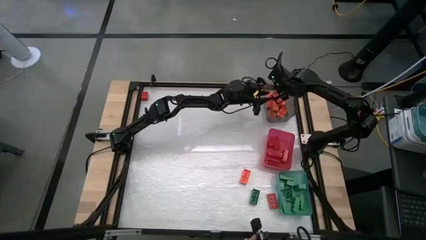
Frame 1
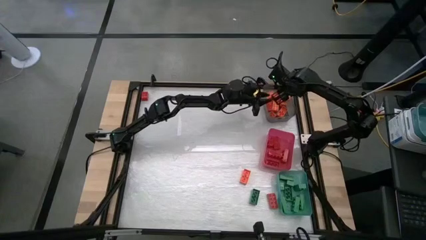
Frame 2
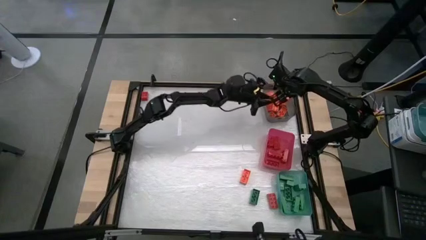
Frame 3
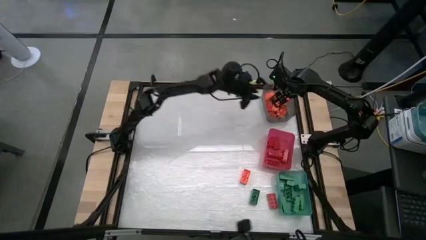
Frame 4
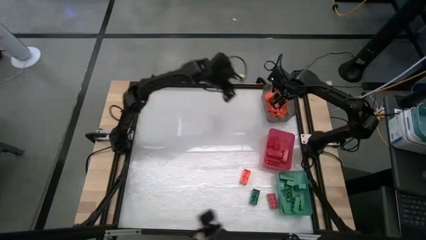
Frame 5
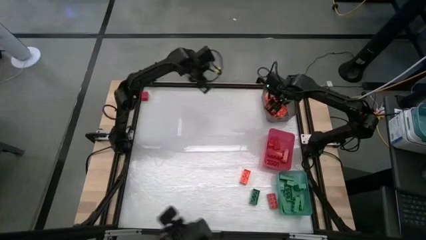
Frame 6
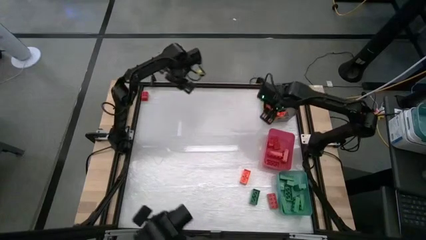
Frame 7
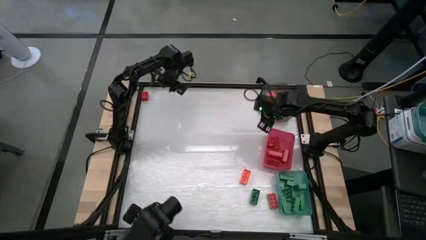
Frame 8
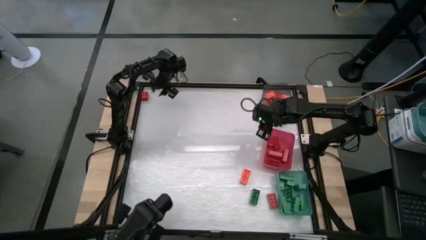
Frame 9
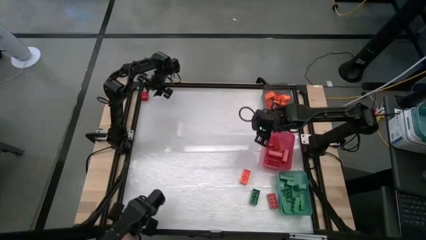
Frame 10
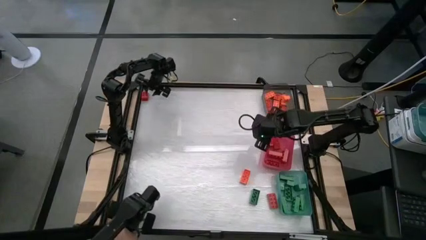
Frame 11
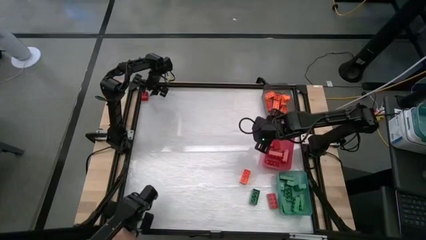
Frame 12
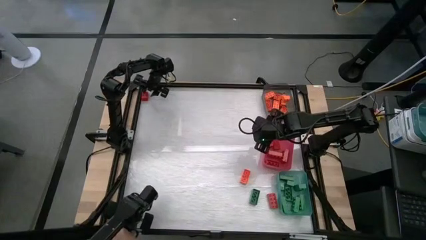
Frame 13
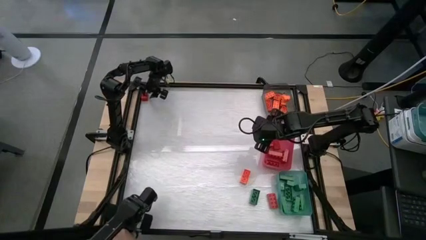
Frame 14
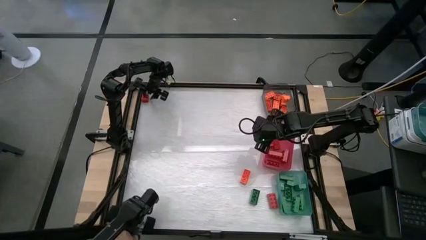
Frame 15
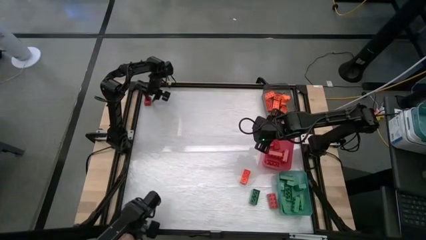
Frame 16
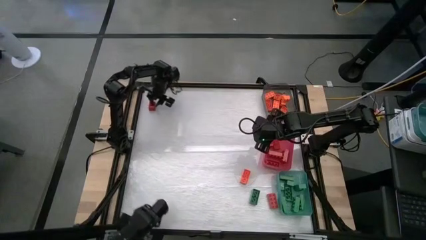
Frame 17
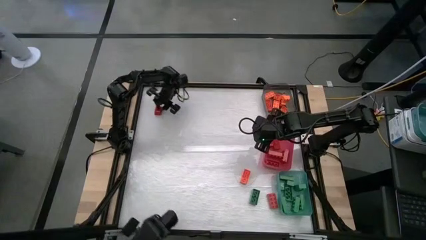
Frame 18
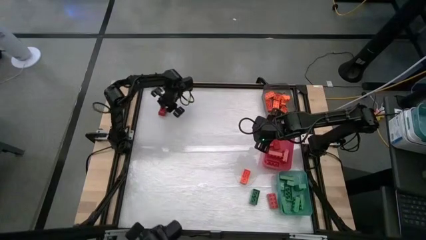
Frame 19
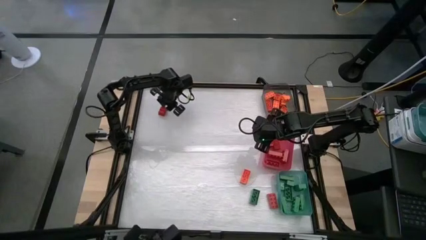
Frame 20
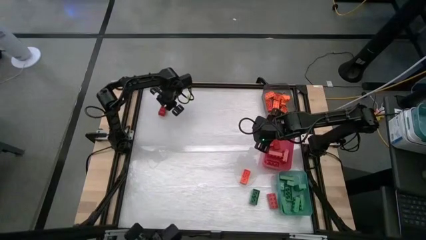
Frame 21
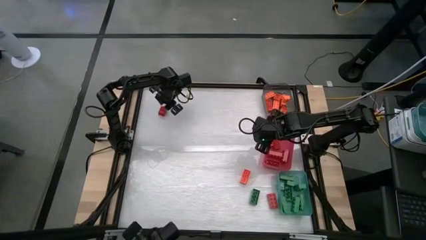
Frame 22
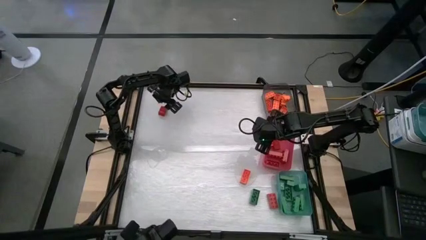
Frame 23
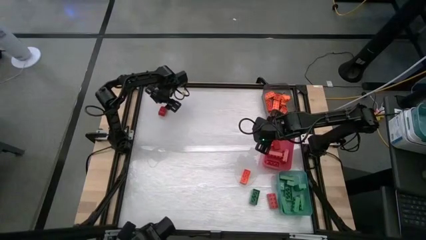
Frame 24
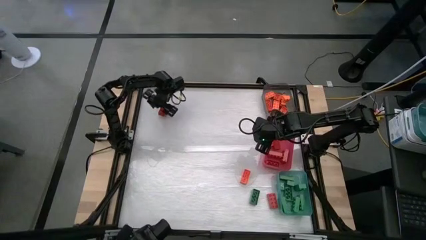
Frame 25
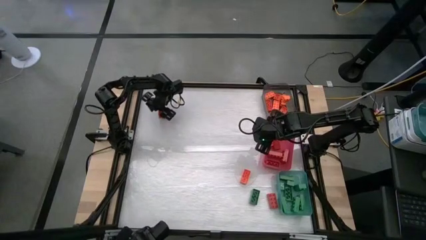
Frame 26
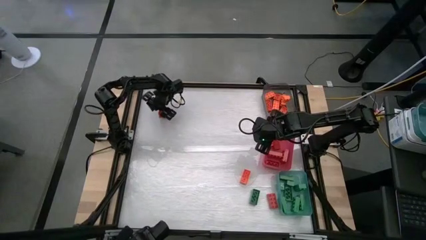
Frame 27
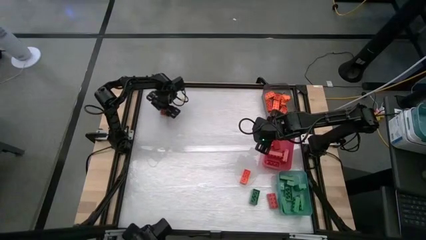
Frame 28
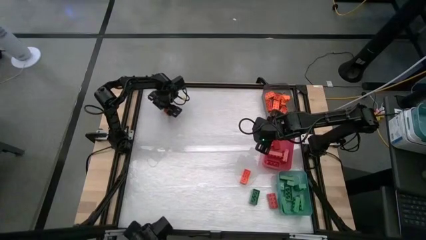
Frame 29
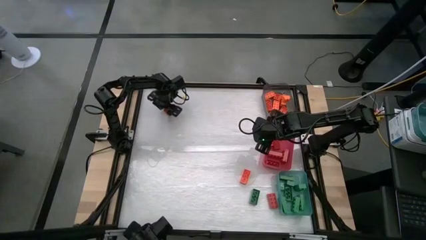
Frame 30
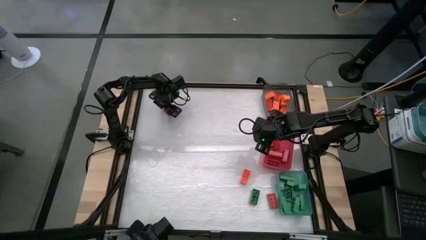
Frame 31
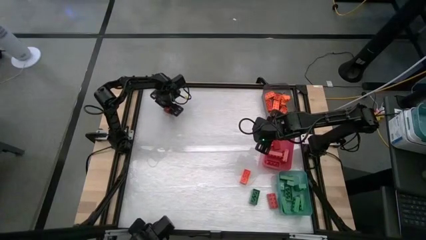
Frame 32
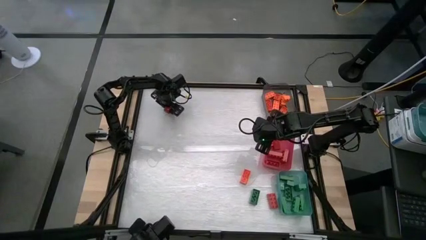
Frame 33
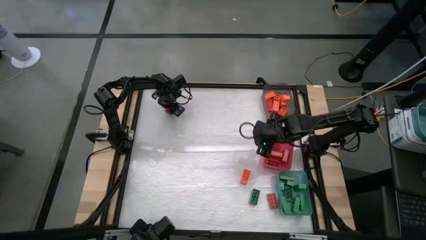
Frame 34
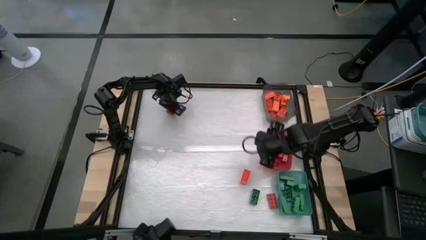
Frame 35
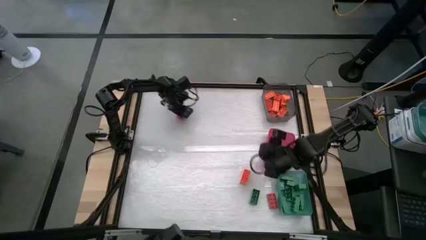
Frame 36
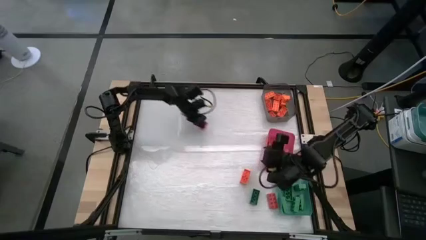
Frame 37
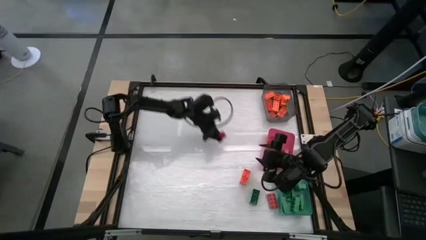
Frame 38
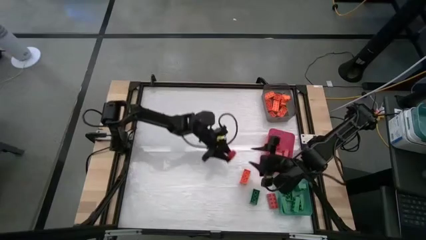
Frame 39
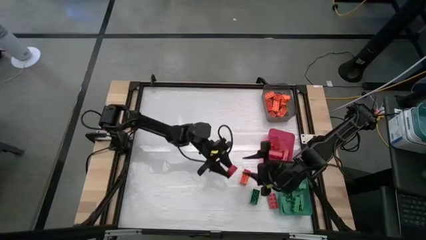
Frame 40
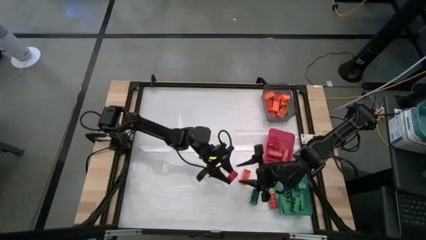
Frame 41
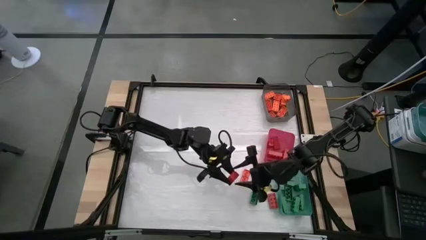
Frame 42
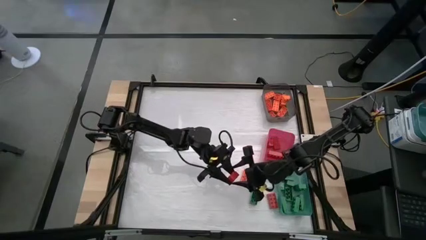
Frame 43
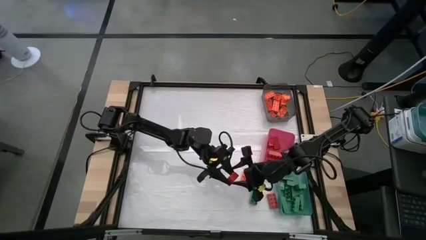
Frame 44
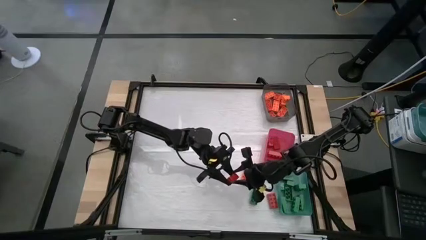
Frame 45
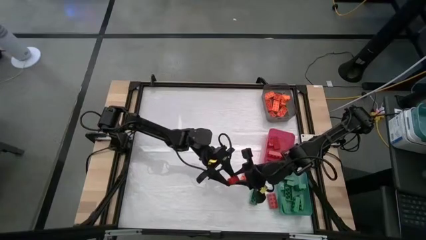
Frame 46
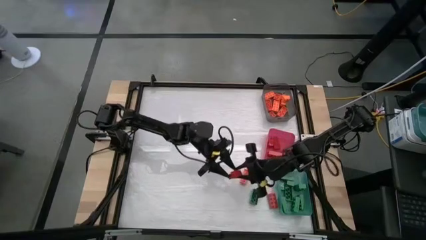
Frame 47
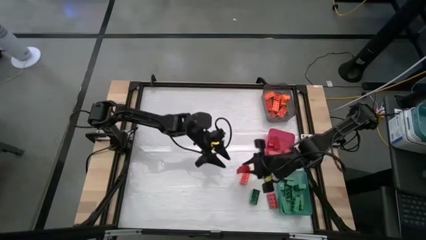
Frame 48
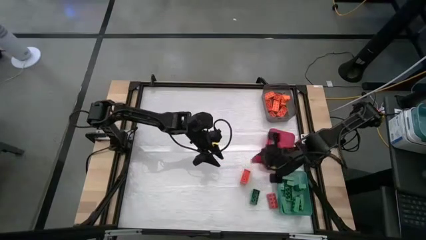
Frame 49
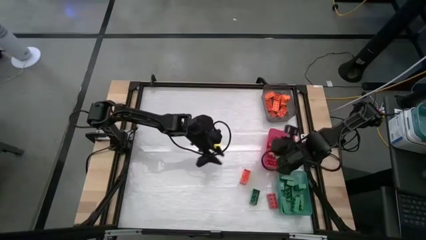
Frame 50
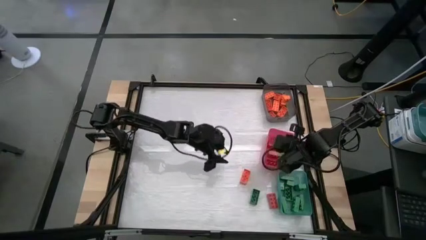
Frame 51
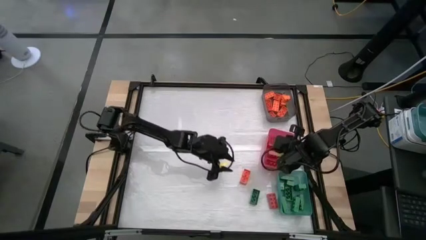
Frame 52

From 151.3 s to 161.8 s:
Task: Sort blocks
Put the red game piece into the red bin

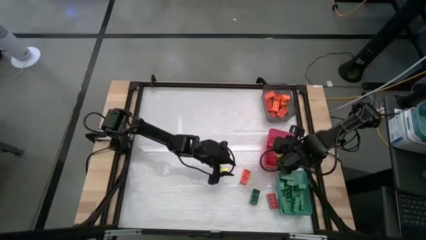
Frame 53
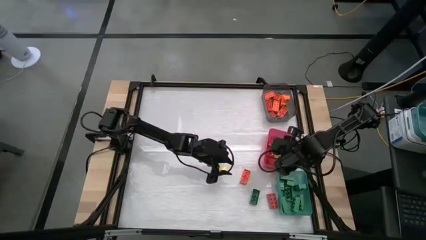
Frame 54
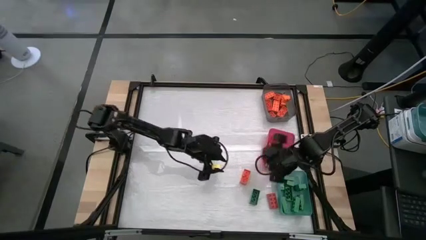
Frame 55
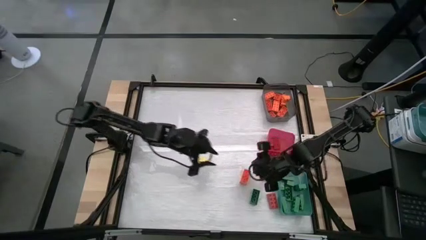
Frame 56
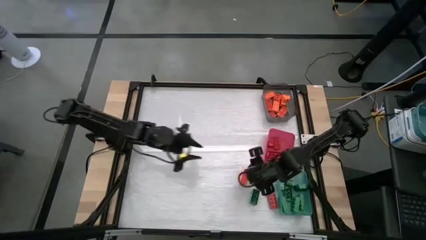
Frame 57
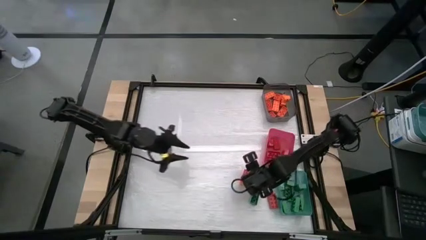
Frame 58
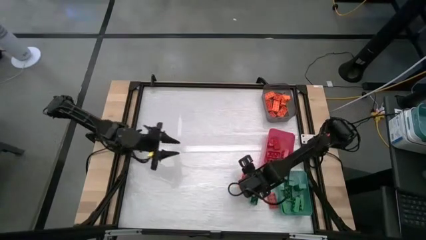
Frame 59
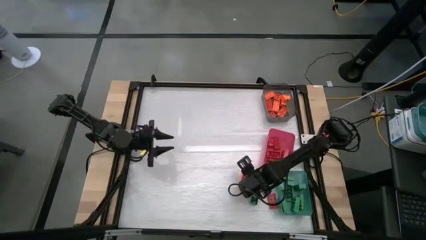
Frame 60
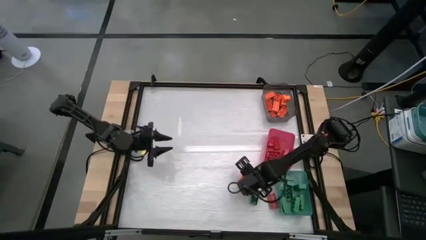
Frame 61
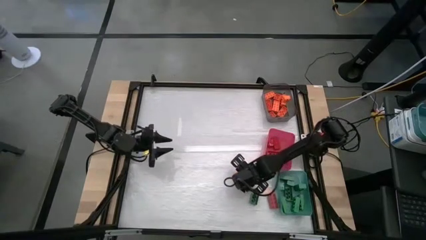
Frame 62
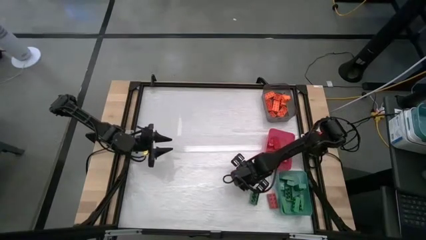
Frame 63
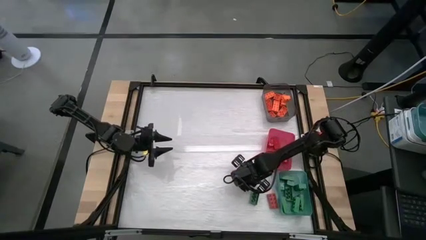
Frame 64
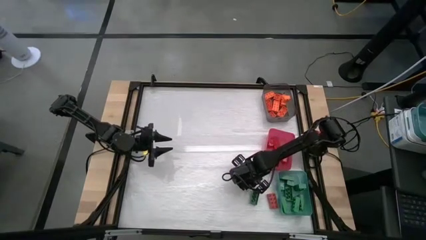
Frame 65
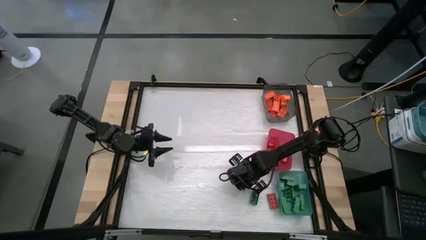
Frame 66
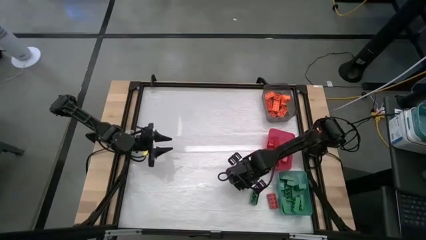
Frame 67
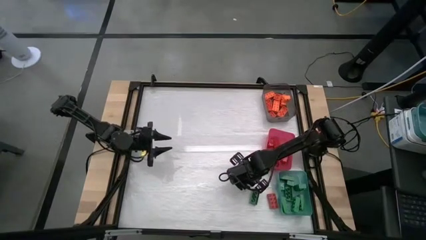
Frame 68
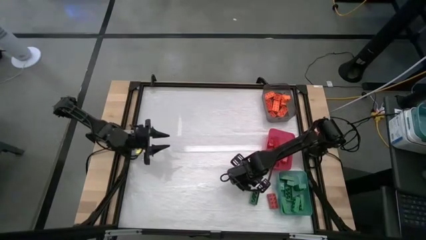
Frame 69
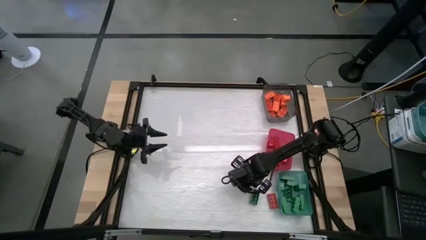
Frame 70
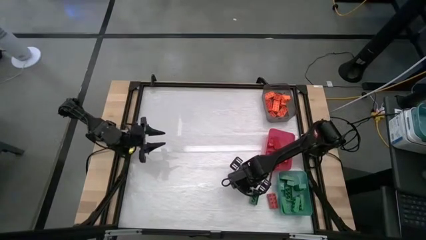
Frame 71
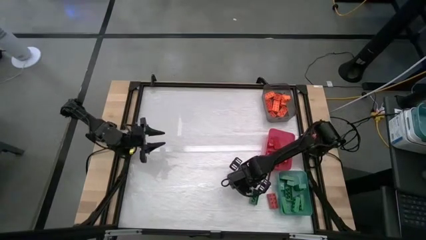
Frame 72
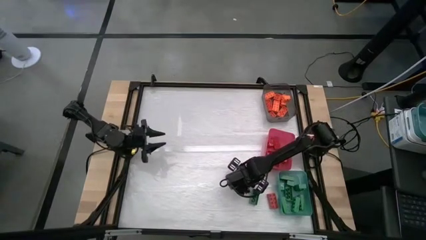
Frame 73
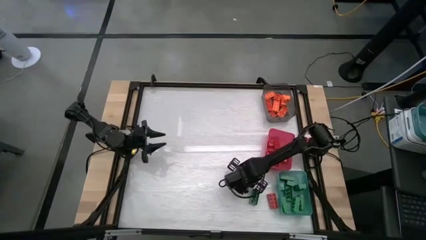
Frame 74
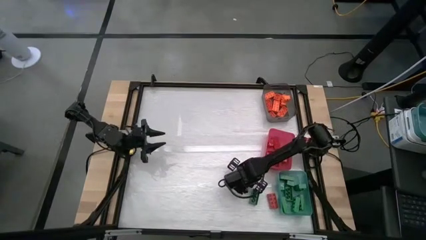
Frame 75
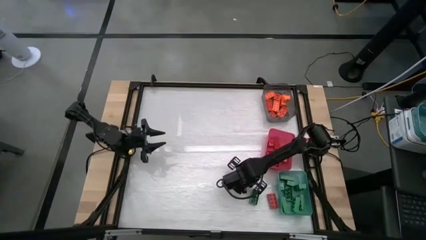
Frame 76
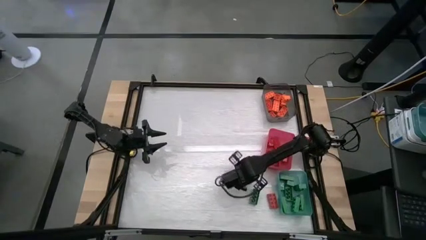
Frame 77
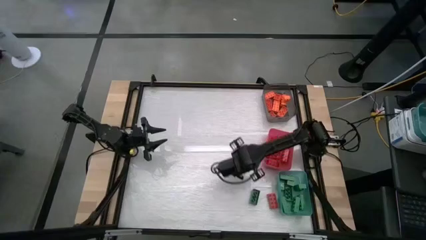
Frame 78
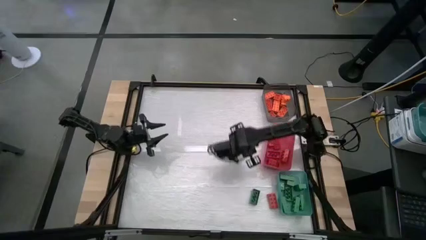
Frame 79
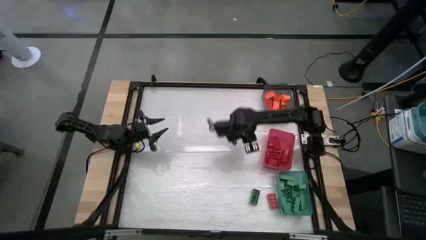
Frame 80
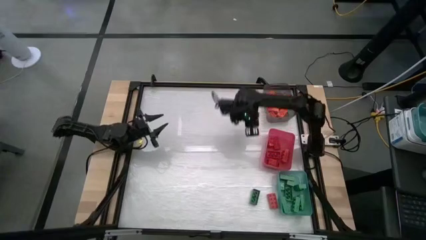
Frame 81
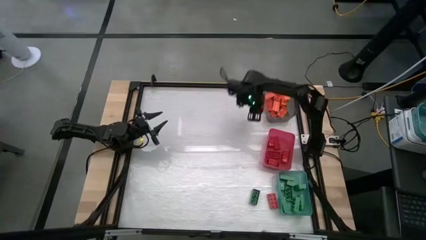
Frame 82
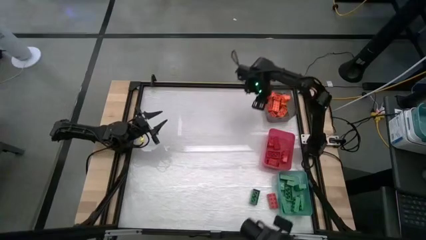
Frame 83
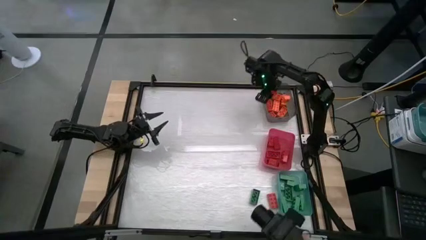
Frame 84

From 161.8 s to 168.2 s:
Put the orange game piece into the black bin

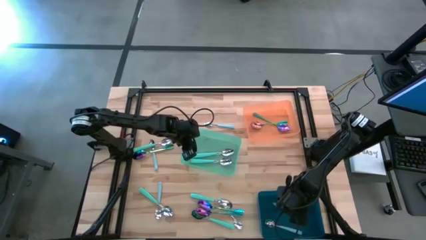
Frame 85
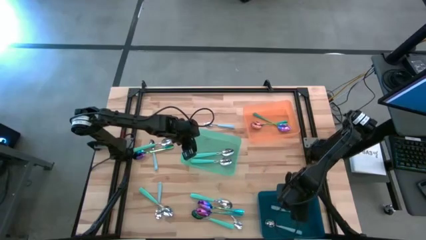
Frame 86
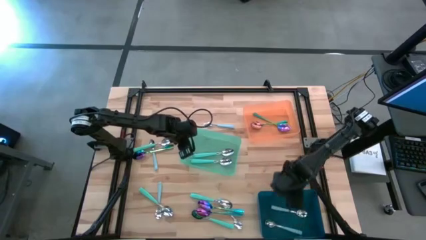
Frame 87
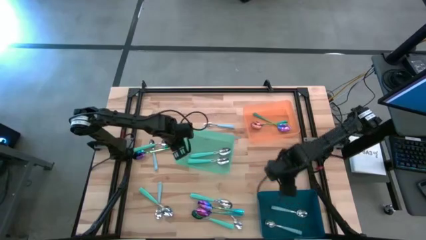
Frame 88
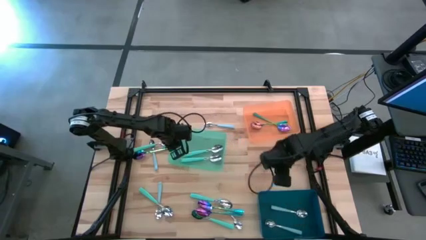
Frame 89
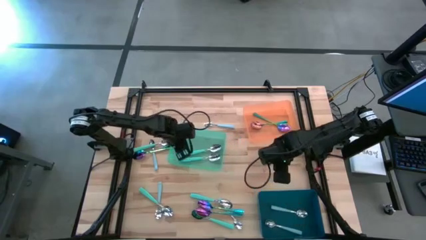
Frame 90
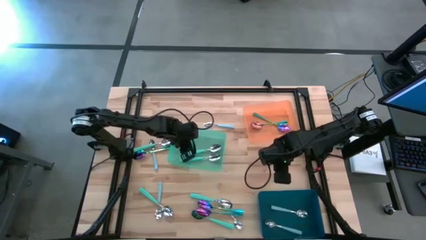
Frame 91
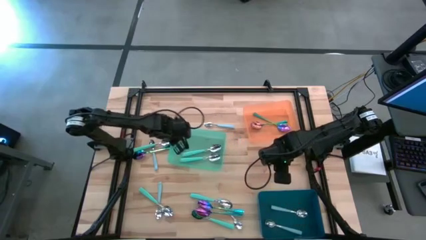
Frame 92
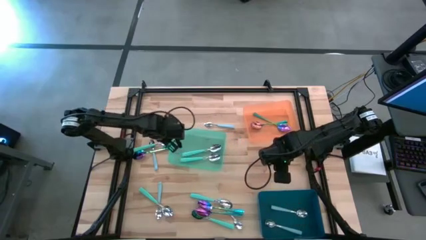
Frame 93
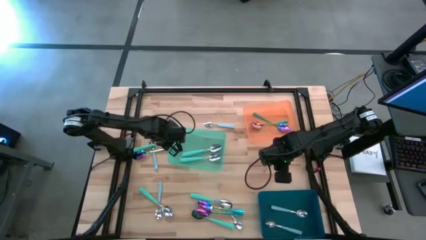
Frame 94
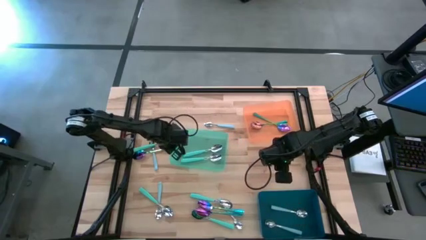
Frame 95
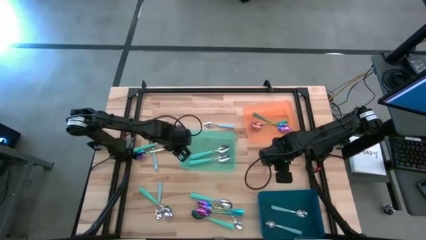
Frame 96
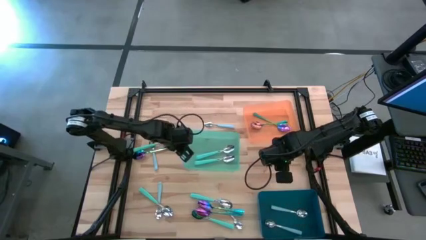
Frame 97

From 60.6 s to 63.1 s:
Task: Sort silverware by color (type)
Adjust the green bin
